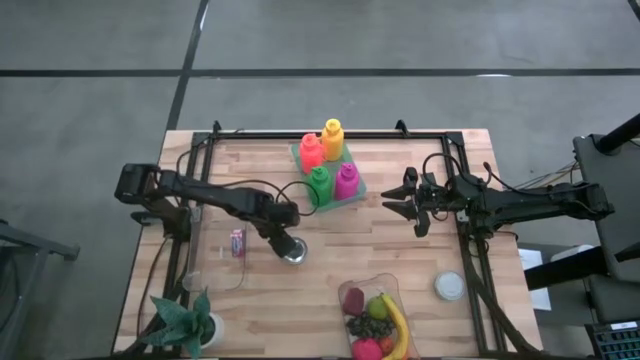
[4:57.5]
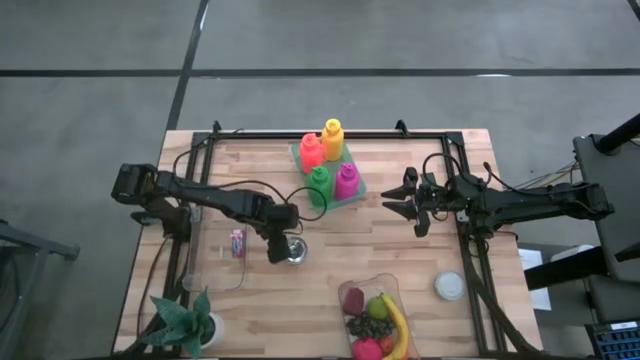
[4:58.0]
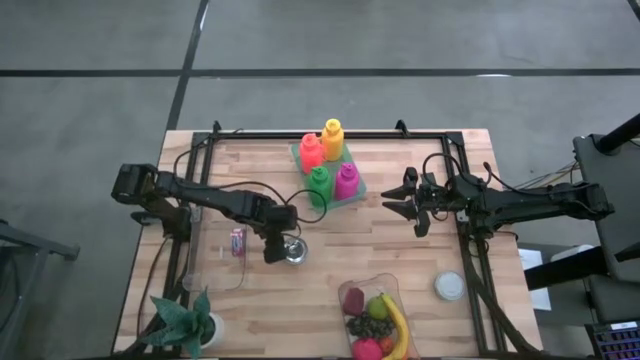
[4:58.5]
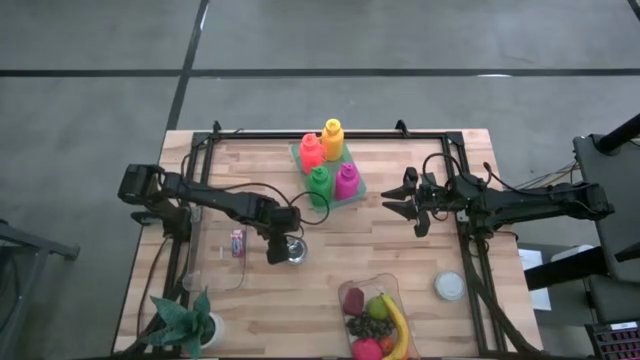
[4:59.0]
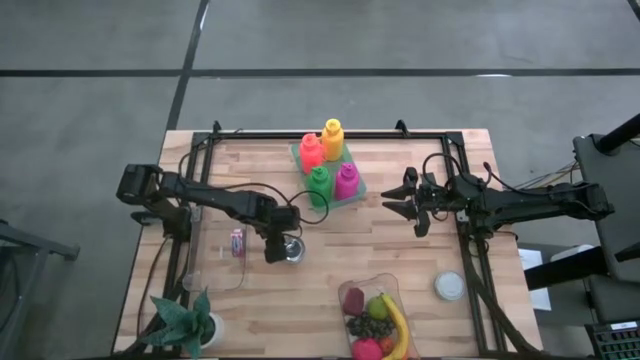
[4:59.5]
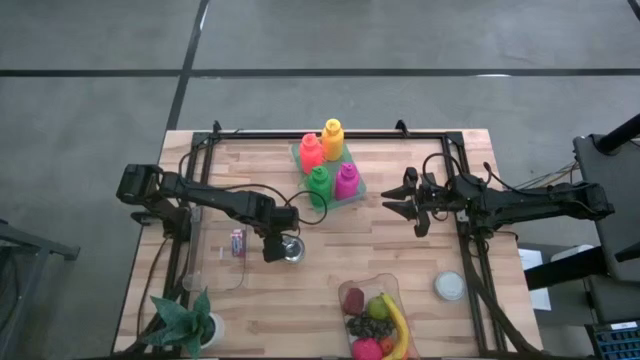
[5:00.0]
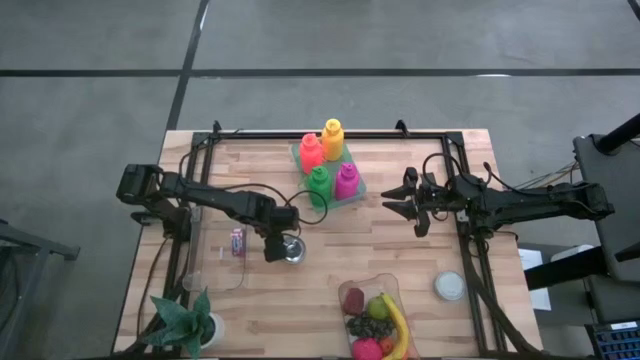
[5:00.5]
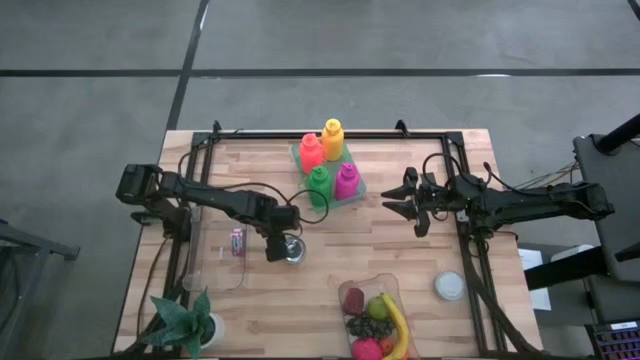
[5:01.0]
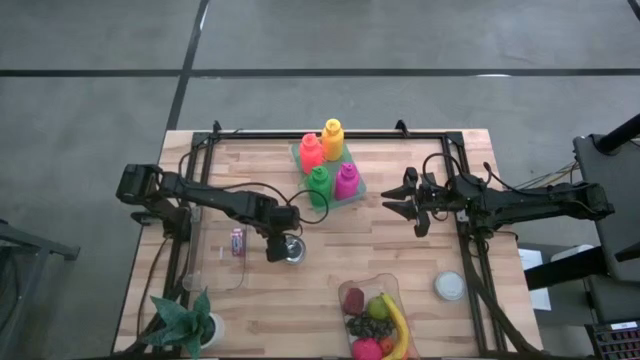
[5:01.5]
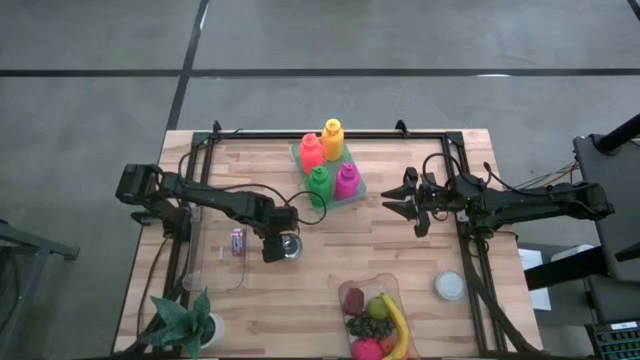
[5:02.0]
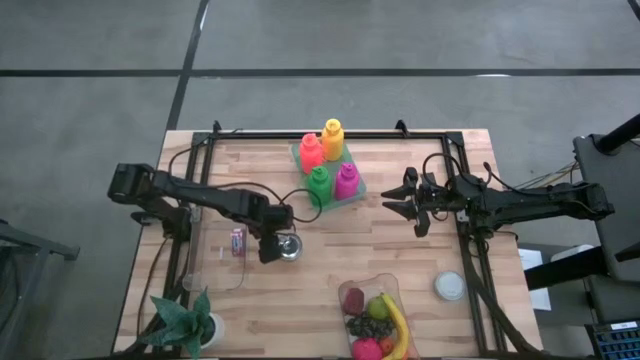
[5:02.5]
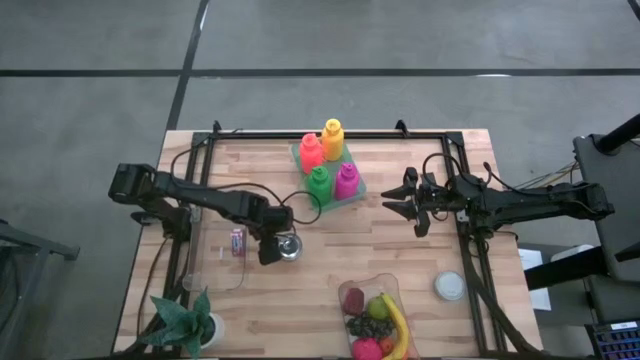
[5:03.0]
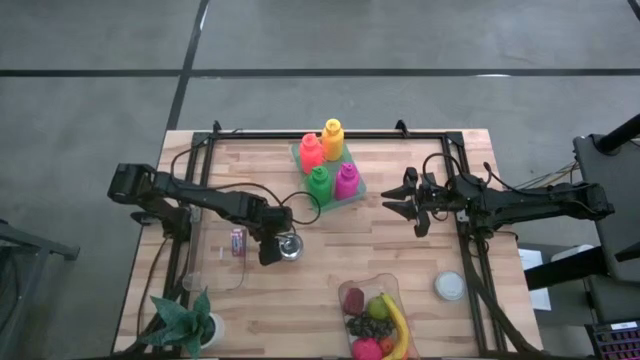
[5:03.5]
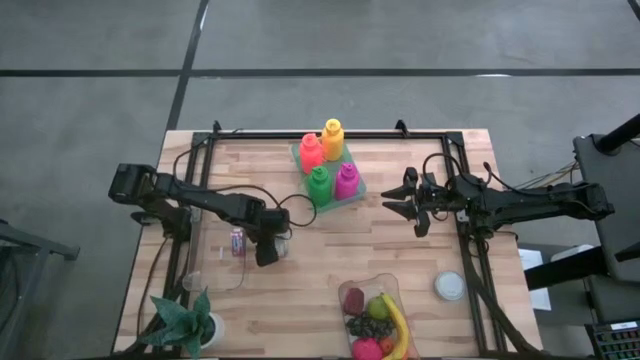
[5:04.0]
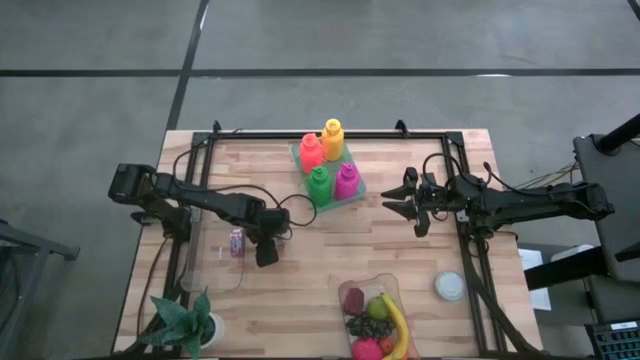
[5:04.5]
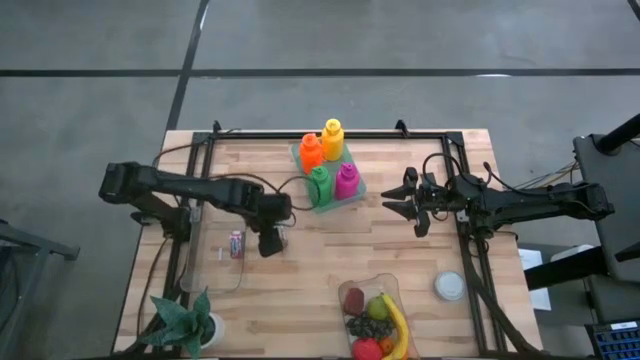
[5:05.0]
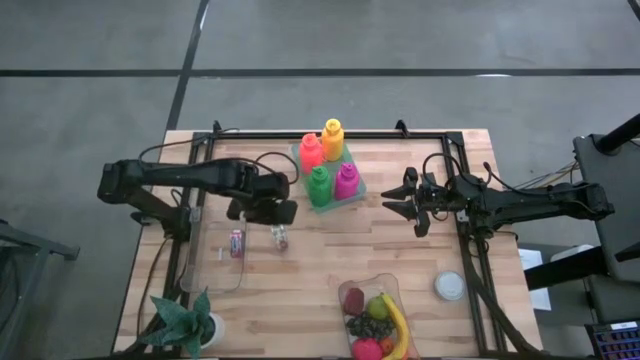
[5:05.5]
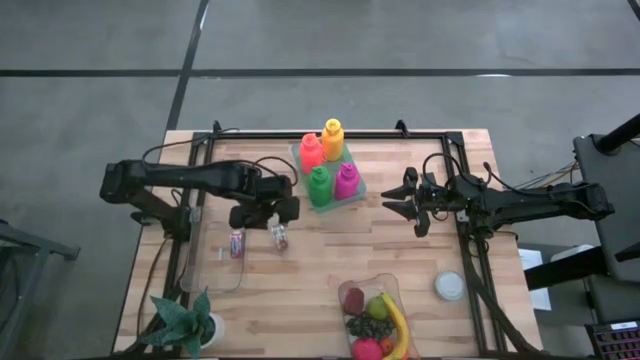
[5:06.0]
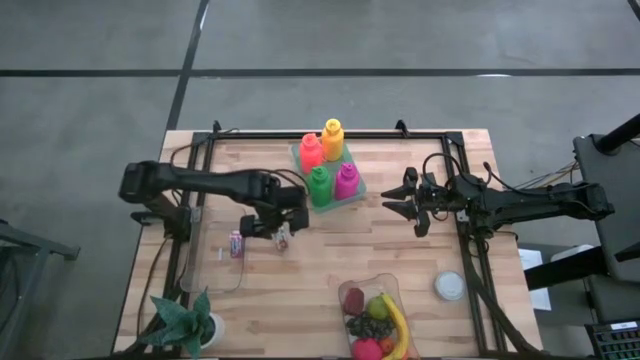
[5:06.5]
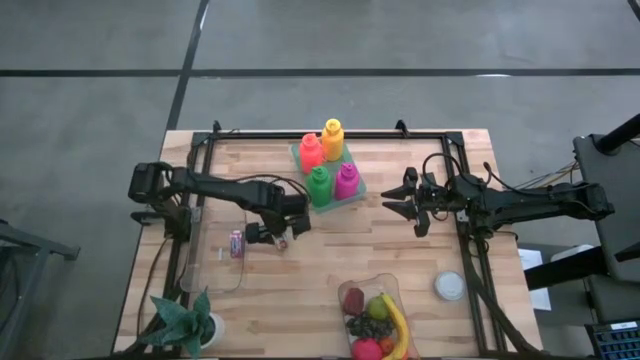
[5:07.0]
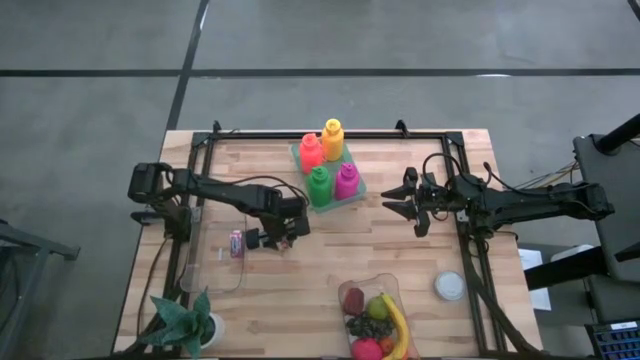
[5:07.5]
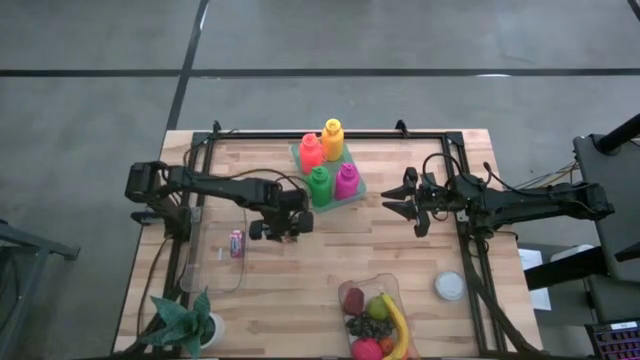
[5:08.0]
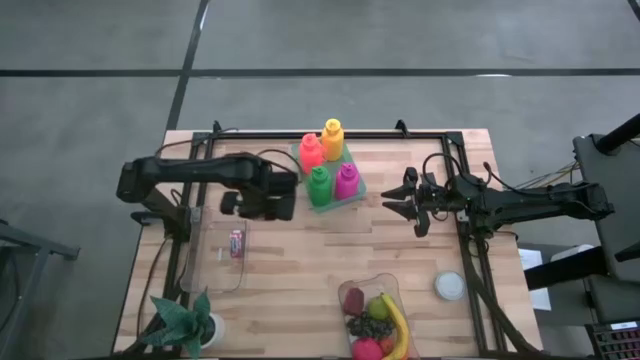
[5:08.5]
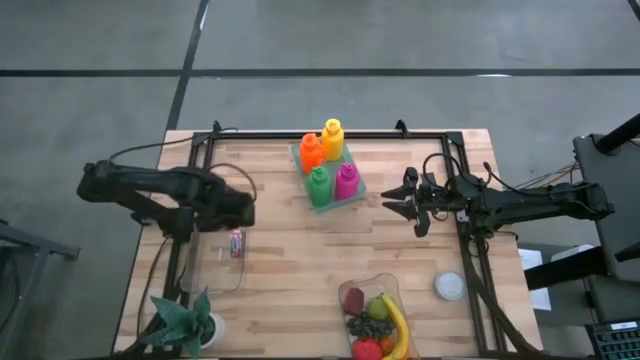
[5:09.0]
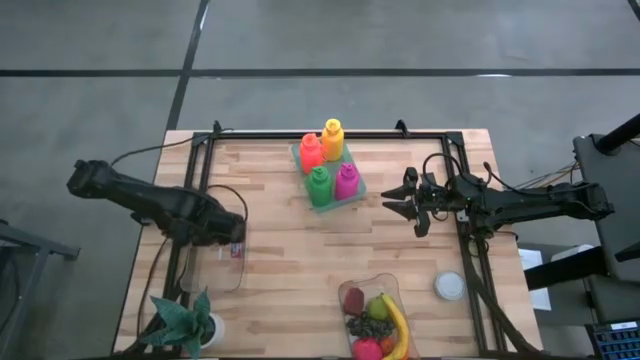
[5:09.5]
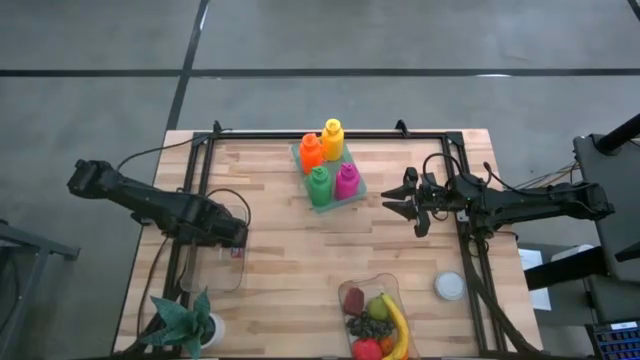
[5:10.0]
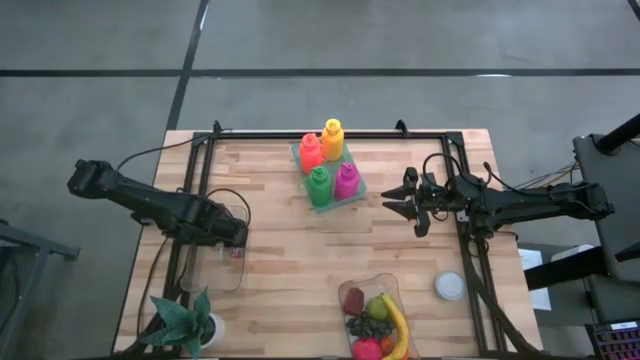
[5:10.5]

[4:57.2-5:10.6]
Task: Pick & Place Food Item
Put the green tuna into the top transparent bin

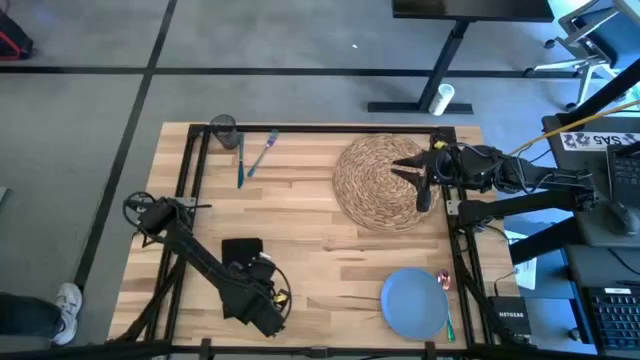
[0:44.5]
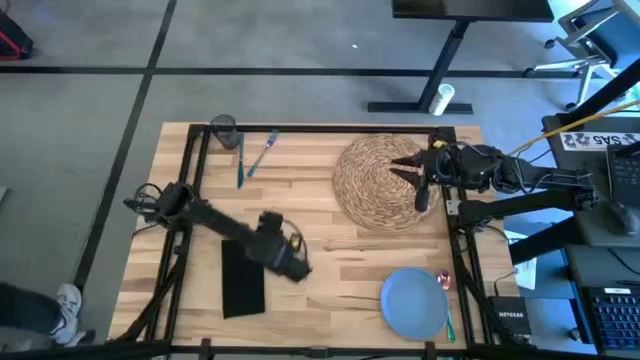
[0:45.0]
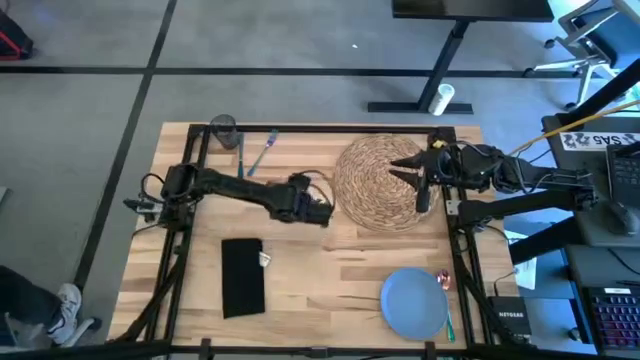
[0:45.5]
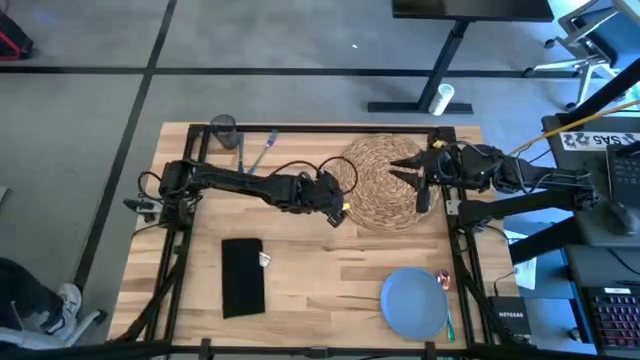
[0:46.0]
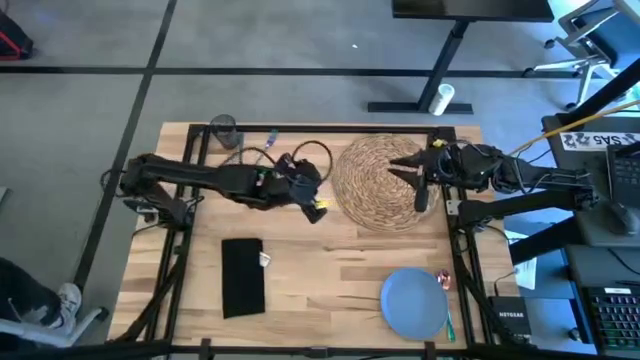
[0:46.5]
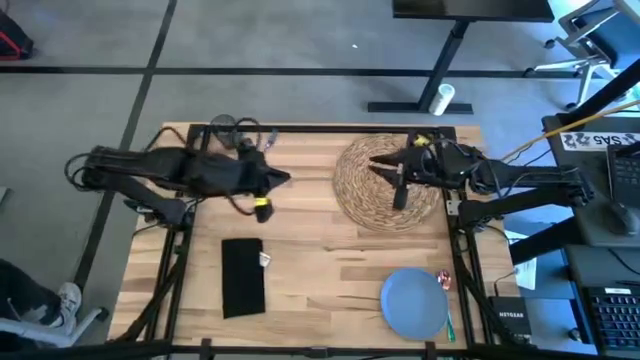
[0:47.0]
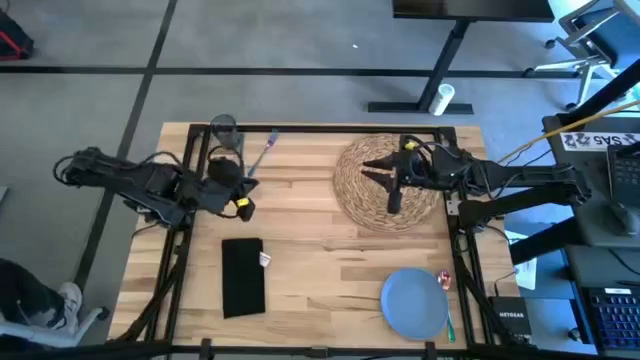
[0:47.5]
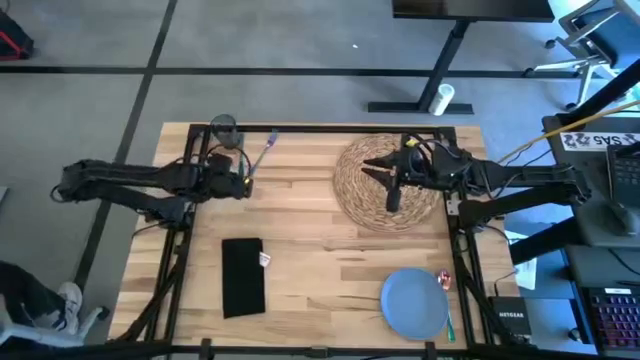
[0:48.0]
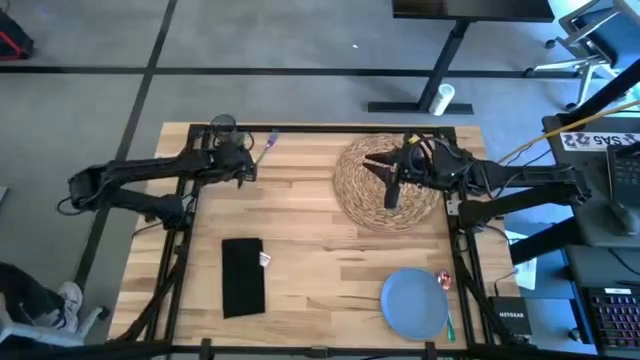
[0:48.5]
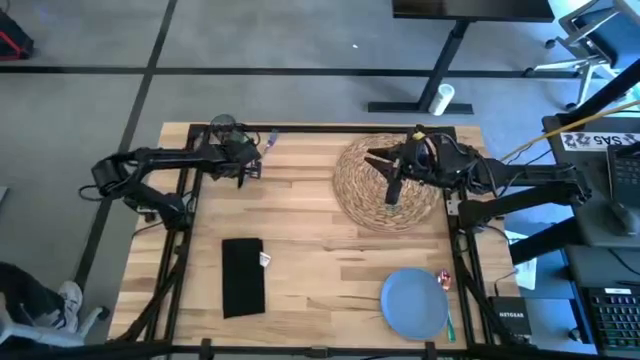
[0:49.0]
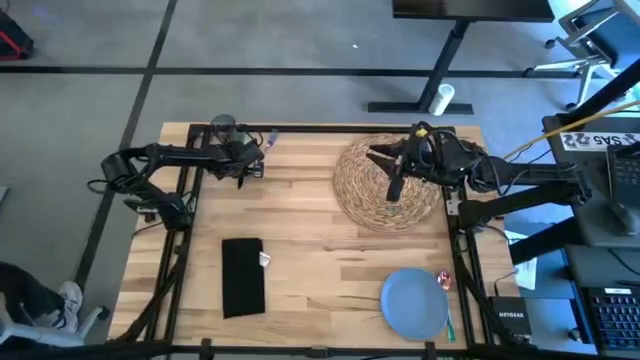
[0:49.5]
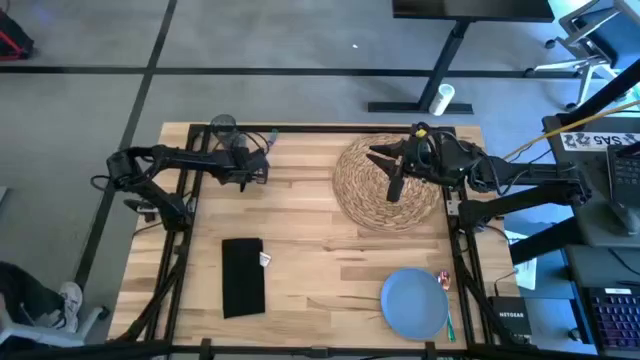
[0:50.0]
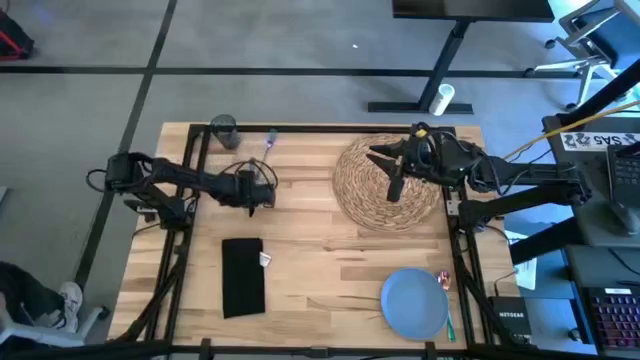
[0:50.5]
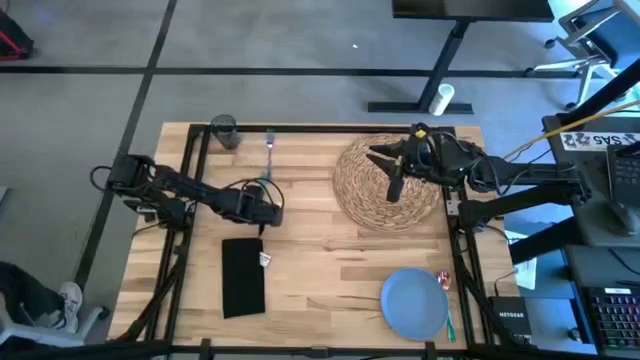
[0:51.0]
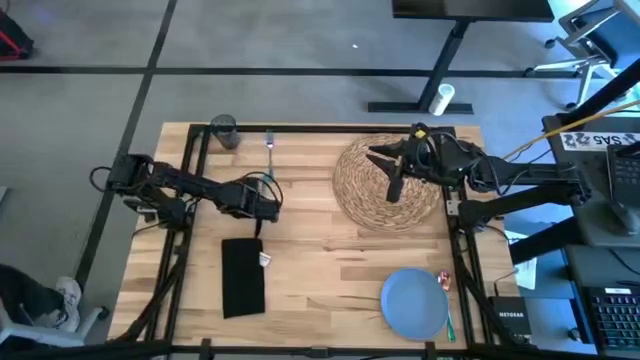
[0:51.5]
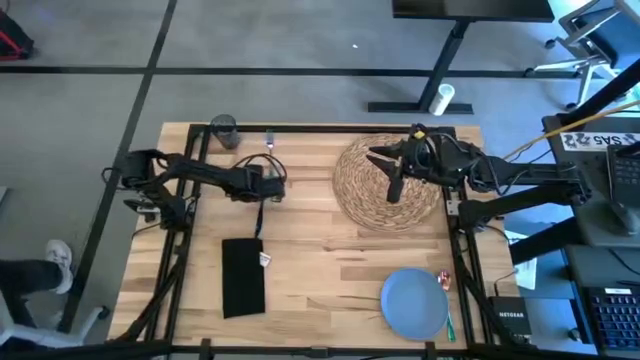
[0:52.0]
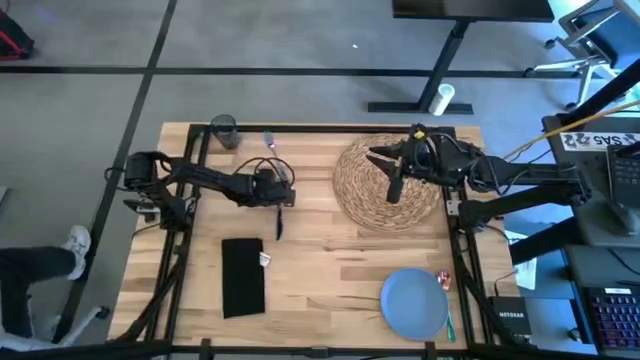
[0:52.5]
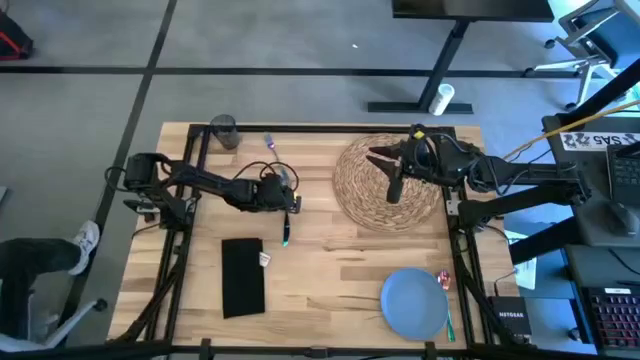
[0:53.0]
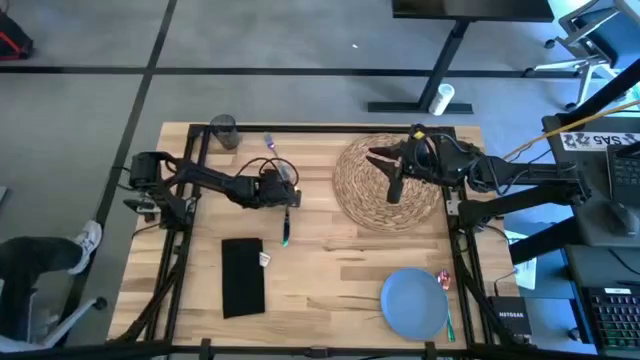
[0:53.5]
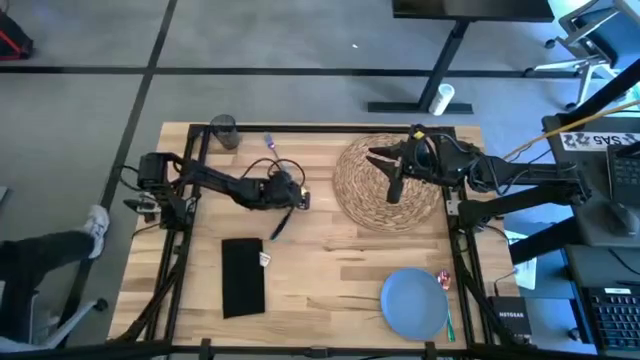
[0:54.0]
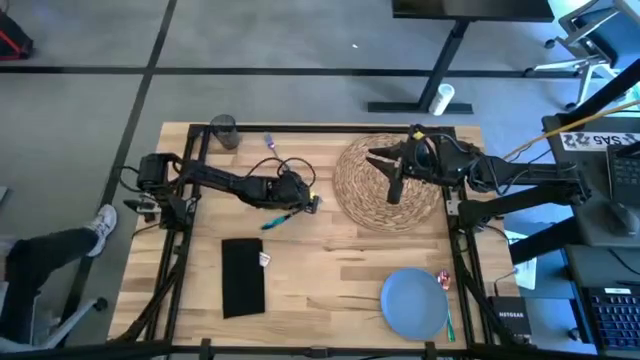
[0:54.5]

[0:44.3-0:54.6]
Task: Set table place
Move the blue knife to the center of the table
